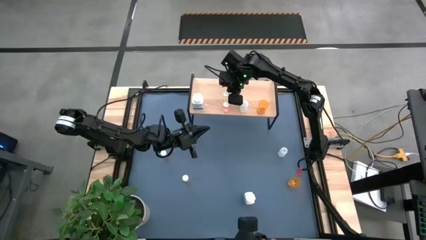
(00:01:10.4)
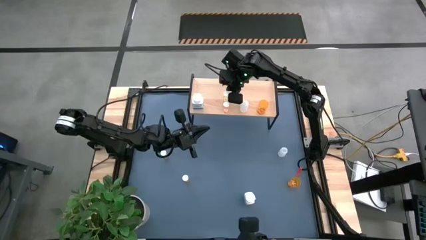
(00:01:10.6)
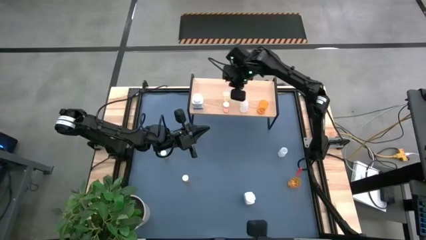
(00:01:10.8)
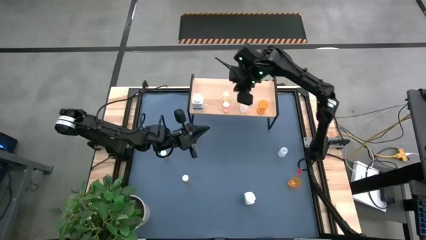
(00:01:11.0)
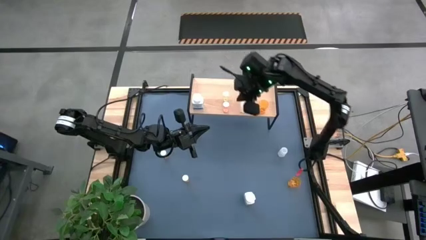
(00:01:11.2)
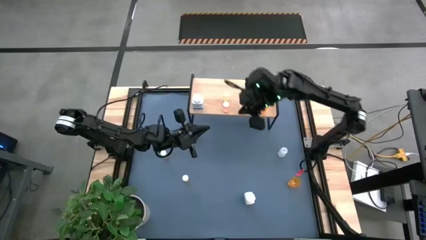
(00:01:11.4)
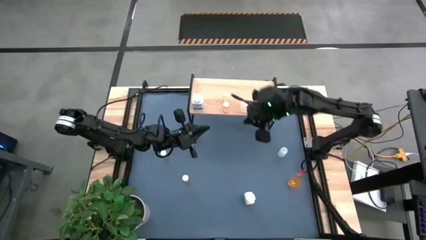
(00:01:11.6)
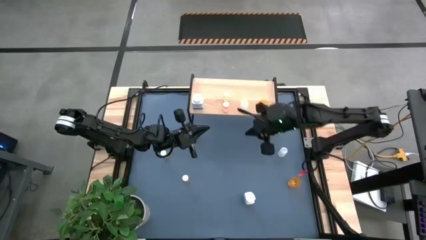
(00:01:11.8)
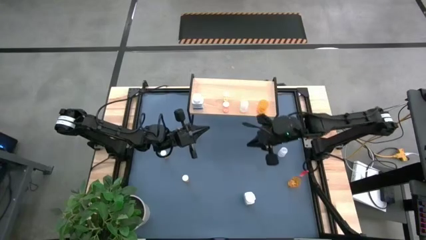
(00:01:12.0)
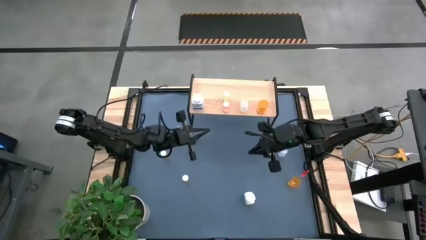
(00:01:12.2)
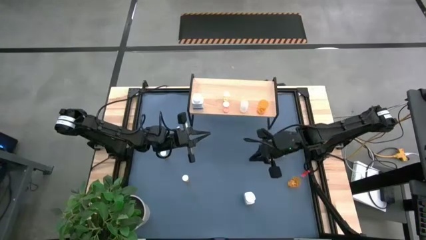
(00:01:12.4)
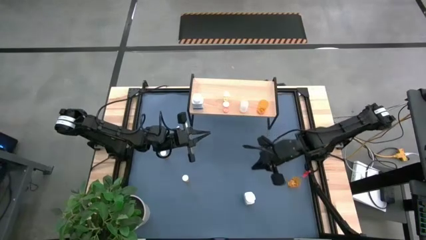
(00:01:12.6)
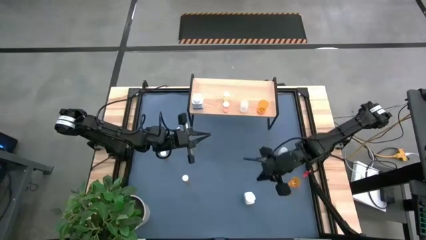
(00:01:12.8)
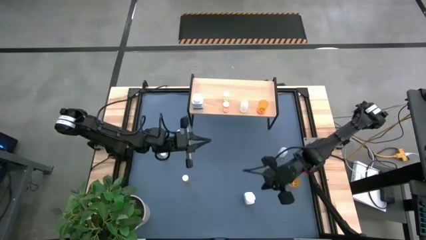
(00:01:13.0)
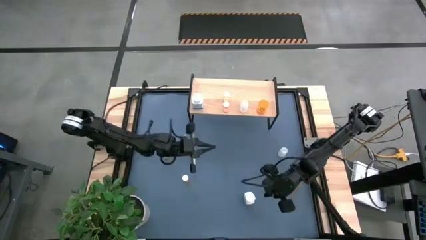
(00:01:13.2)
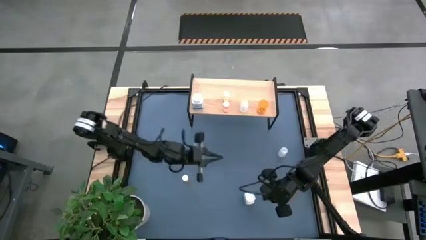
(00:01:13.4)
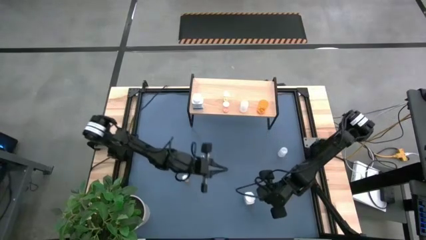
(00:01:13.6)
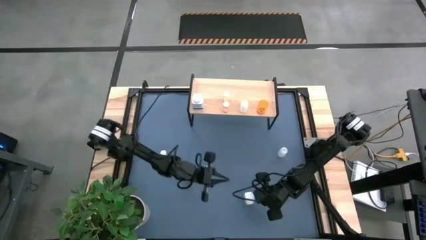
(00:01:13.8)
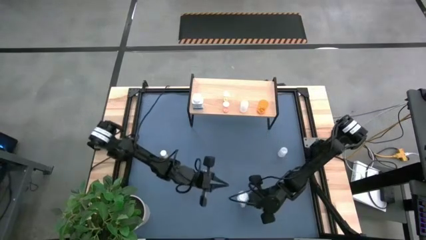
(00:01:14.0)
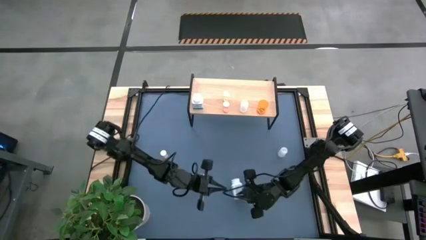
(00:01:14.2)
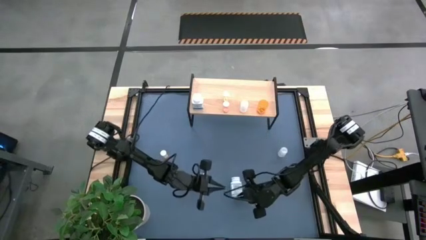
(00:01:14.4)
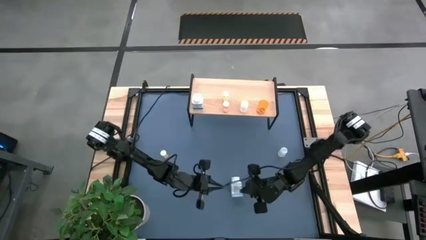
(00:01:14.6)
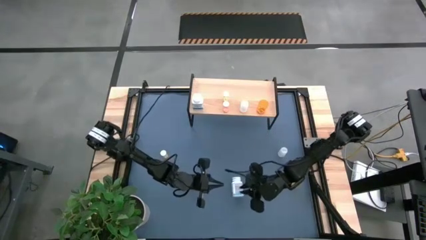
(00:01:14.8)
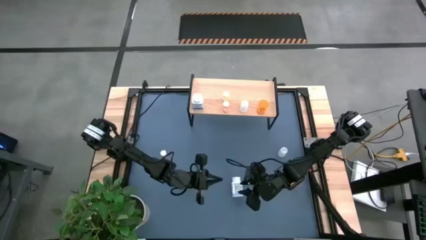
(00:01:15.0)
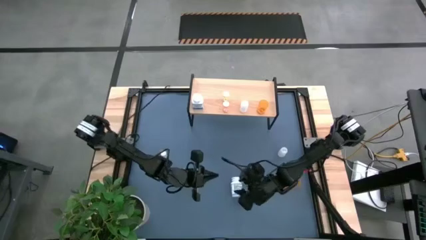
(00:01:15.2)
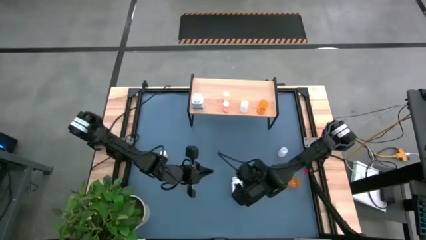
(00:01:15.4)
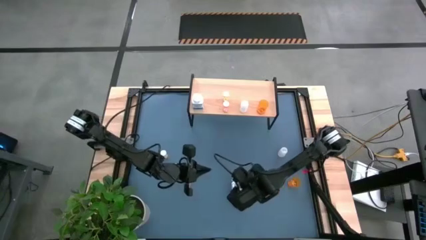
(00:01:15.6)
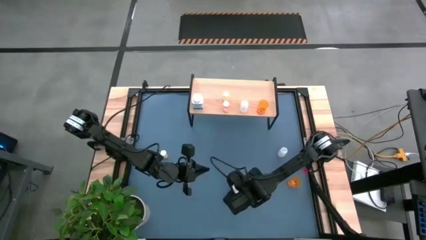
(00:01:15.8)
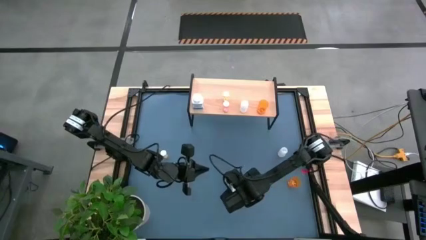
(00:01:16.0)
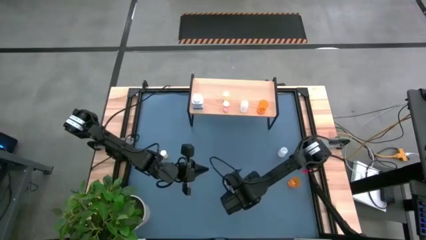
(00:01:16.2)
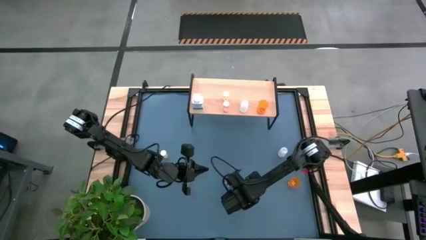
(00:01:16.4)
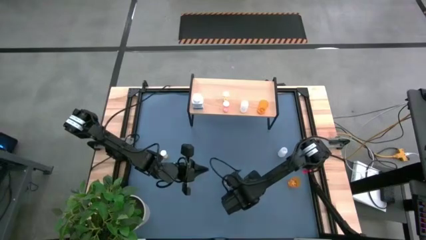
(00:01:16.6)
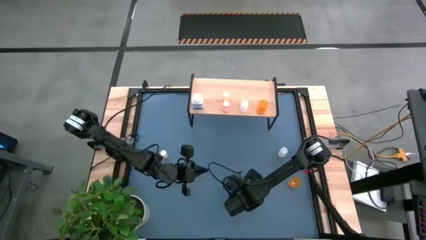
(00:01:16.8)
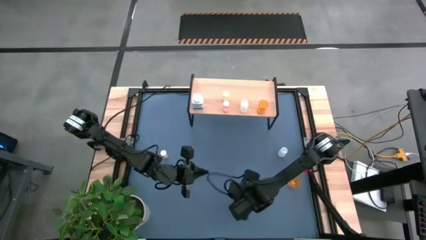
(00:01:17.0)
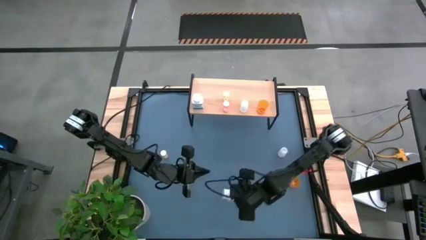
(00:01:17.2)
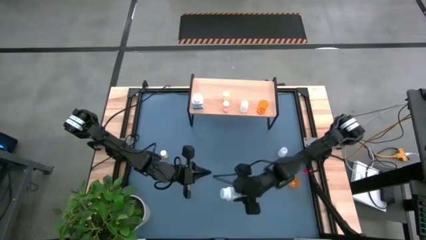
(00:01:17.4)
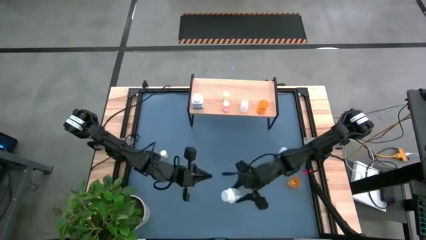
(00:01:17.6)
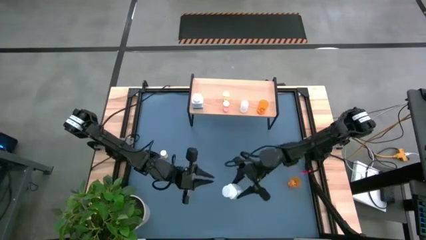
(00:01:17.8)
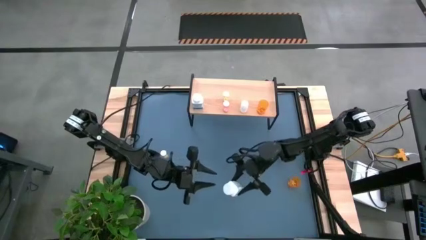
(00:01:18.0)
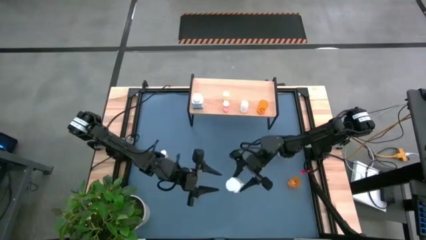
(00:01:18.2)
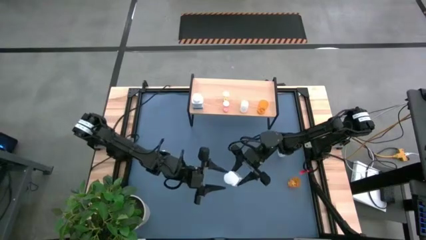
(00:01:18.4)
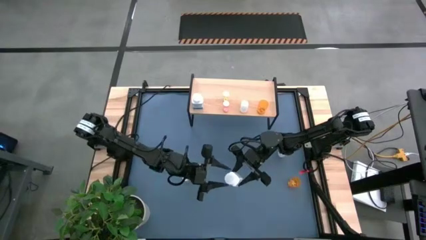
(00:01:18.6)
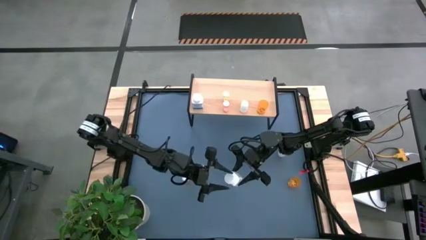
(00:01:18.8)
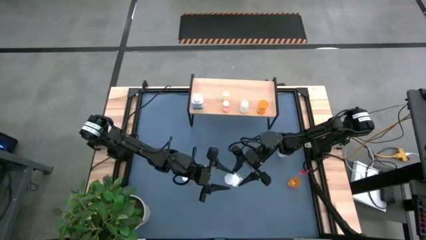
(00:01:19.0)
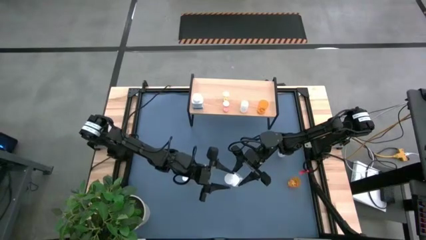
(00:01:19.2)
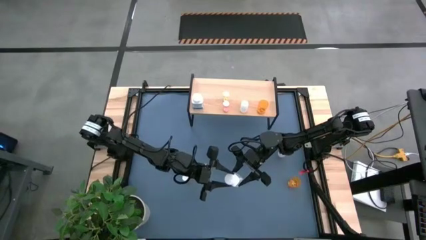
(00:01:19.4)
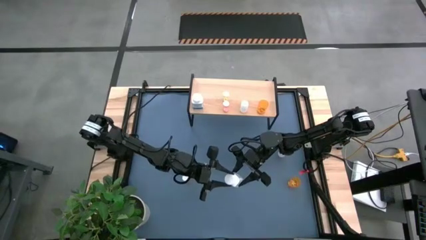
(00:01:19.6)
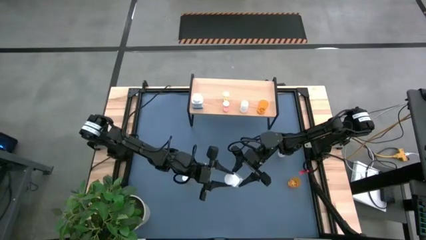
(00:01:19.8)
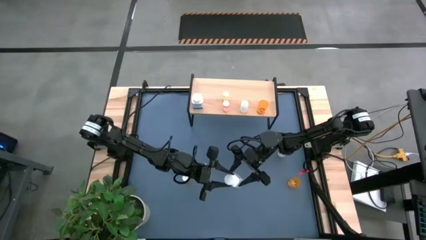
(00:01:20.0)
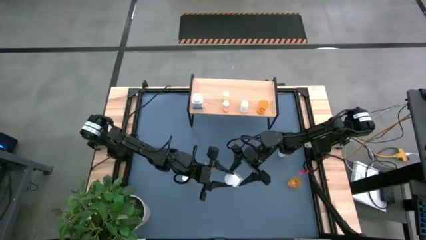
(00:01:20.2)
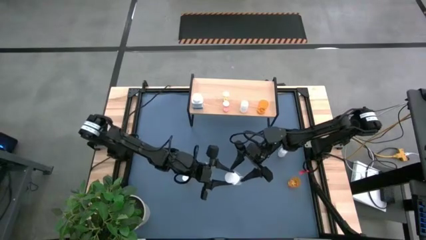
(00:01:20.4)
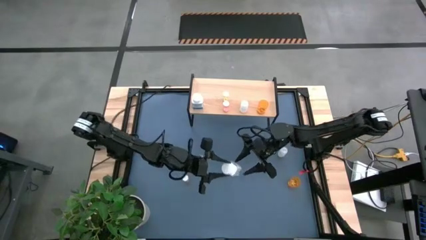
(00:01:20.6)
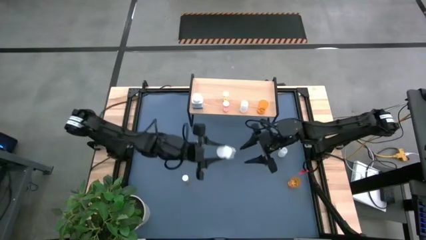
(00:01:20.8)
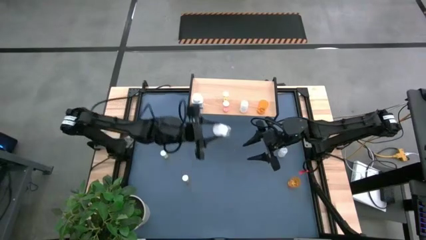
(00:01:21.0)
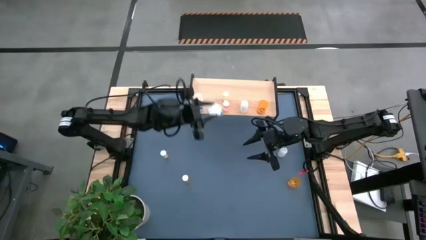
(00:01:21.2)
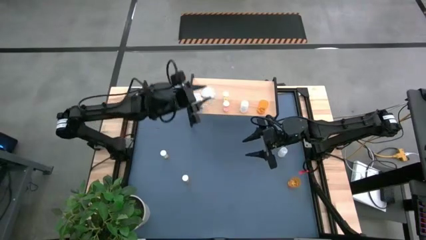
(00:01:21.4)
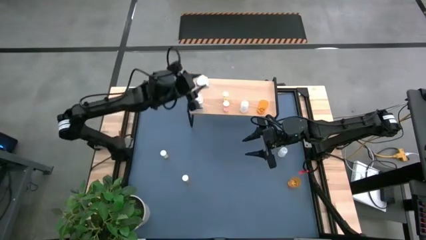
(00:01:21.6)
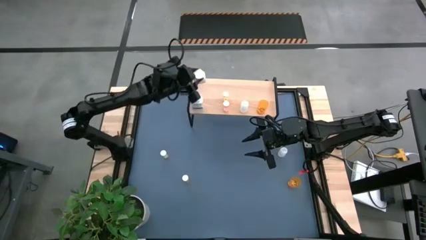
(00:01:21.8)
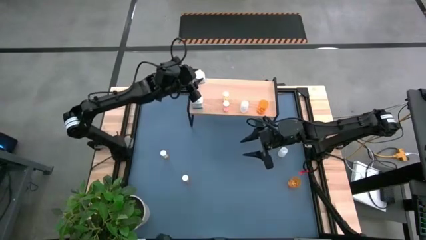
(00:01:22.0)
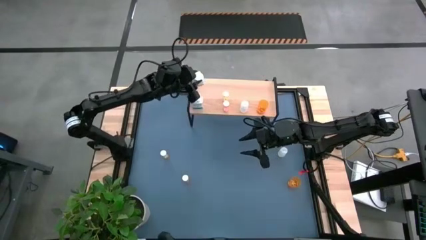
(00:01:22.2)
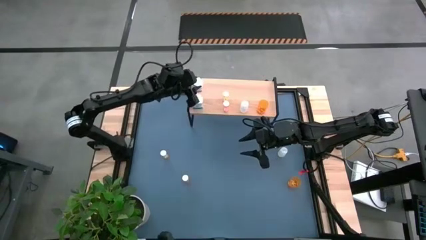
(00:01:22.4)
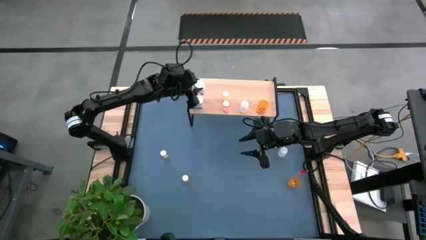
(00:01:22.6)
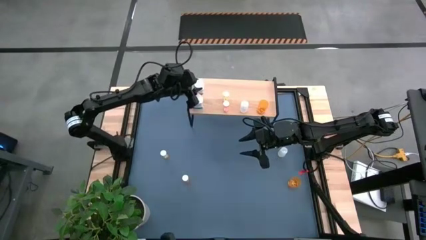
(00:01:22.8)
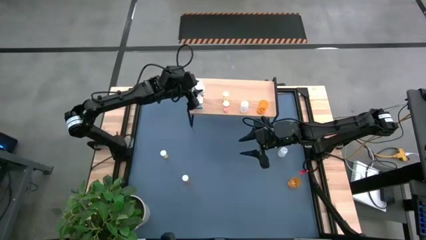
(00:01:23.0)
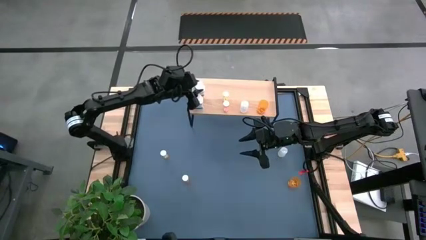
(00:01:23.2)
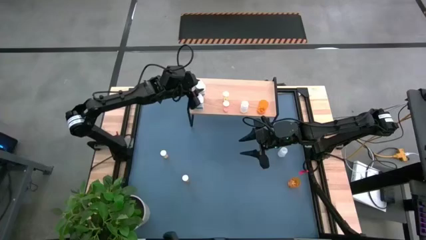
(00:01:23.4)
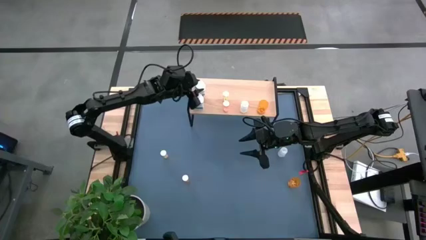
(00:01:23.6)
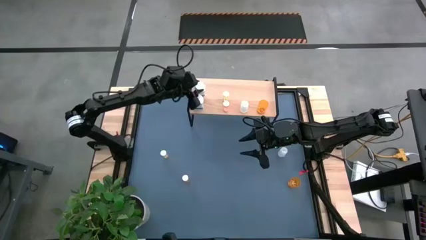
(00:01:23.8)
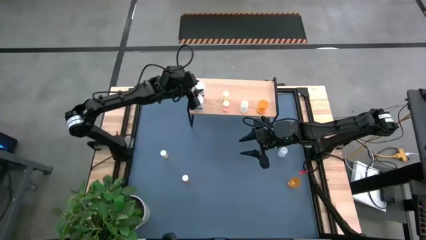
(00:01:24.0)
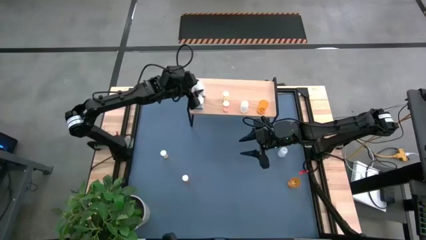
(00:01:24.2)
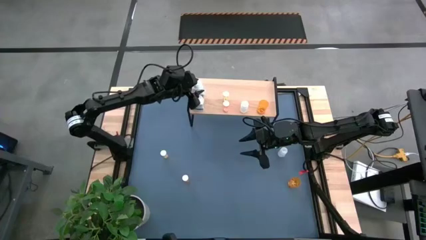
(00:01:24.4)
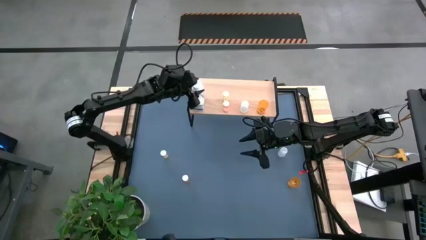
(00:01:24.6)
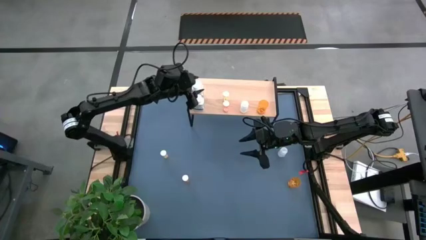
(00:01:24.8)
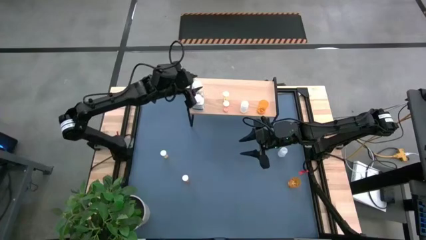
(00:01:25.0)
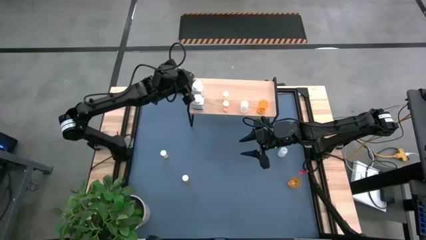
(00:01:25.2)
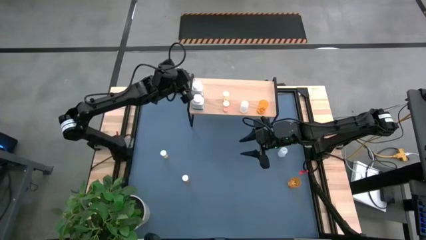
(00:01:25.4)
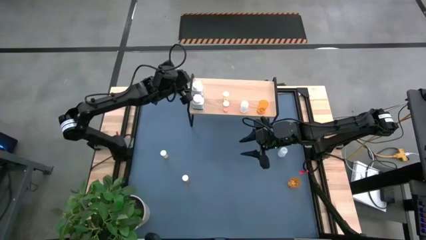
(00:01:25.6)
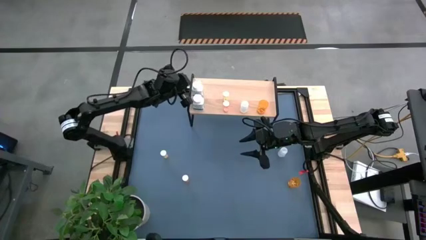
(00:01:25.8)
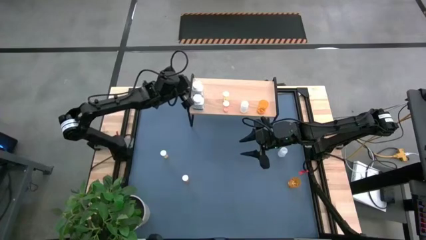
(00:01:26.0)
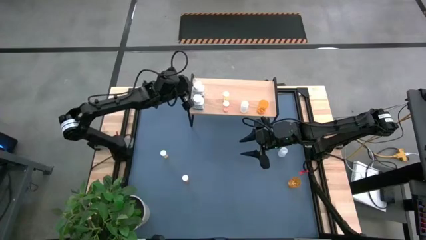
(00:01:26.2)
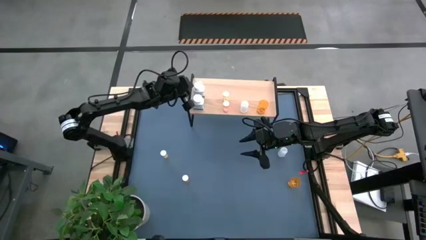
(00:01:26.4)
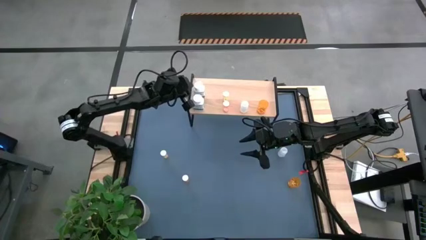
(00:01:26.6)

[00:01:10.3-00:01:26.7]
Task: Pick and place medicine bottles onto shelf by color
Put the white pill bottle on the shelf
